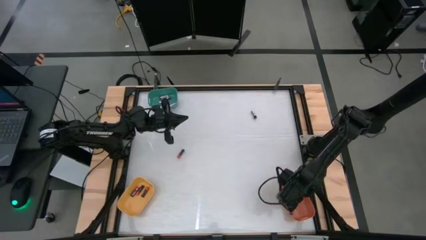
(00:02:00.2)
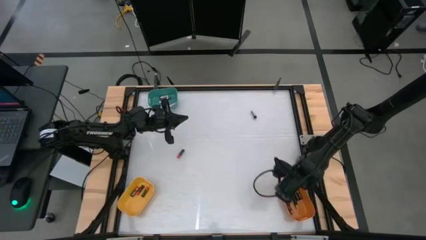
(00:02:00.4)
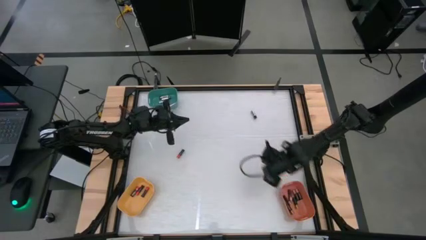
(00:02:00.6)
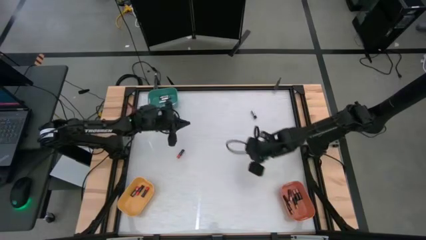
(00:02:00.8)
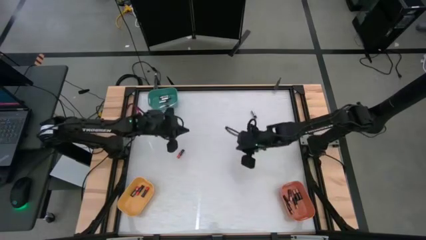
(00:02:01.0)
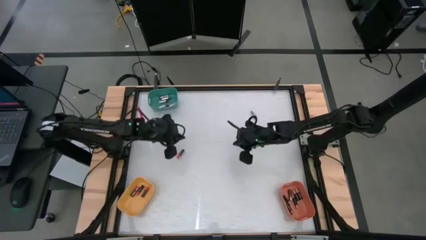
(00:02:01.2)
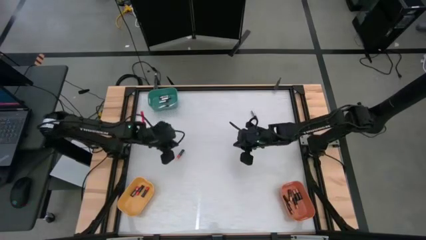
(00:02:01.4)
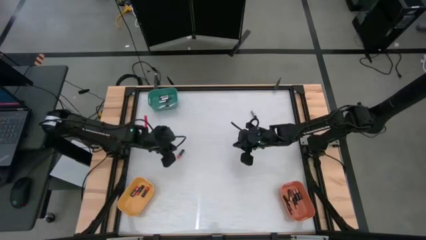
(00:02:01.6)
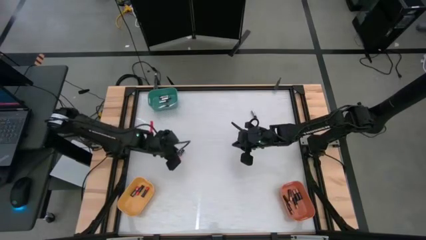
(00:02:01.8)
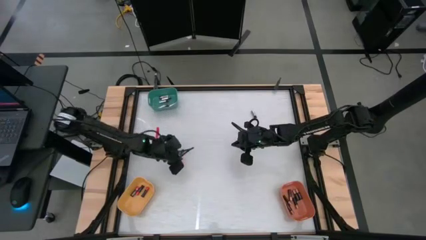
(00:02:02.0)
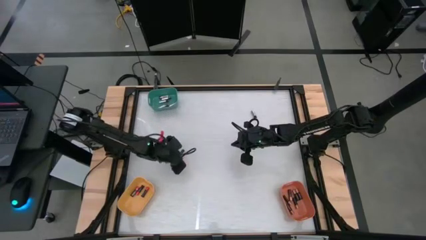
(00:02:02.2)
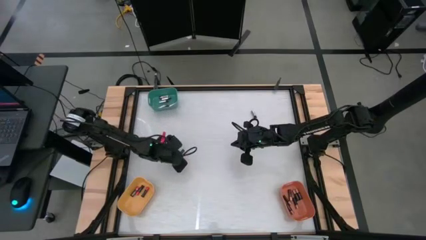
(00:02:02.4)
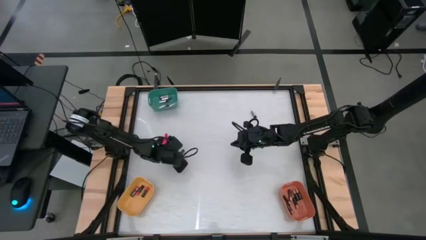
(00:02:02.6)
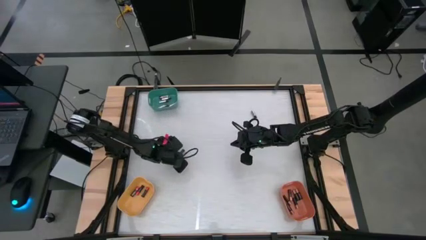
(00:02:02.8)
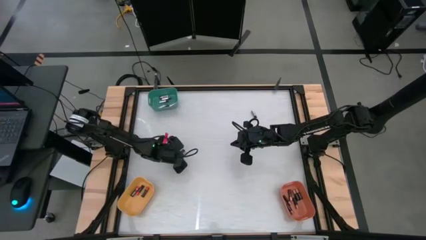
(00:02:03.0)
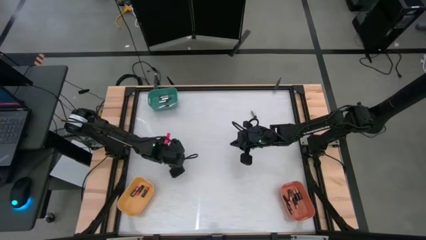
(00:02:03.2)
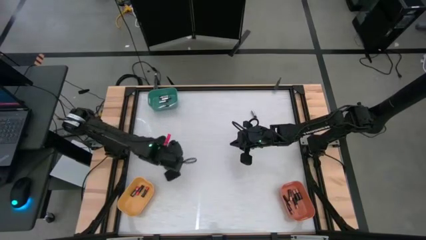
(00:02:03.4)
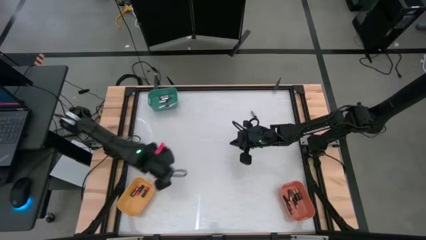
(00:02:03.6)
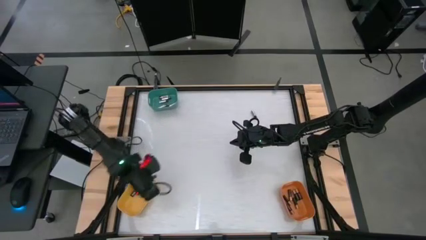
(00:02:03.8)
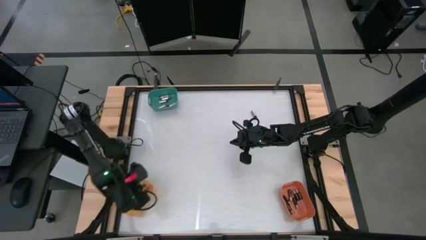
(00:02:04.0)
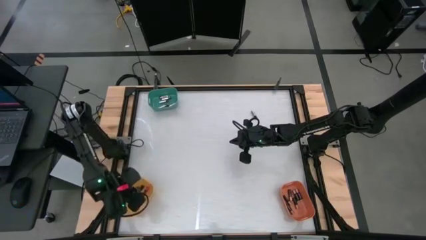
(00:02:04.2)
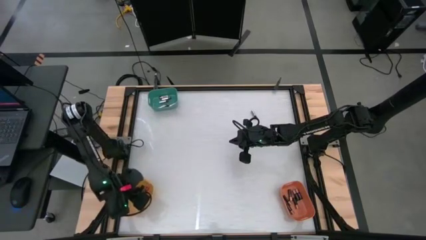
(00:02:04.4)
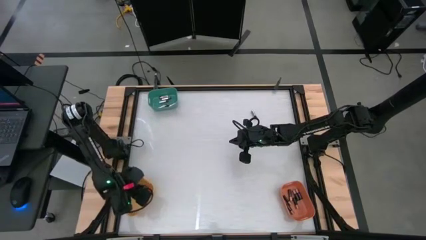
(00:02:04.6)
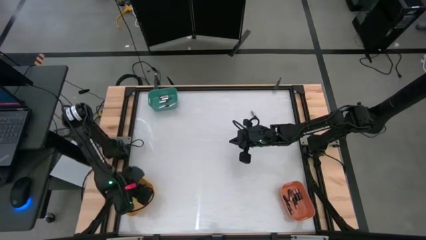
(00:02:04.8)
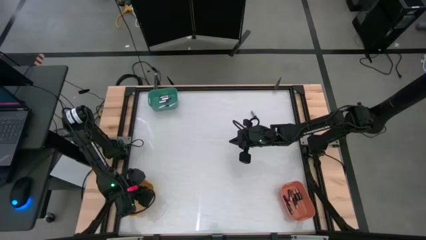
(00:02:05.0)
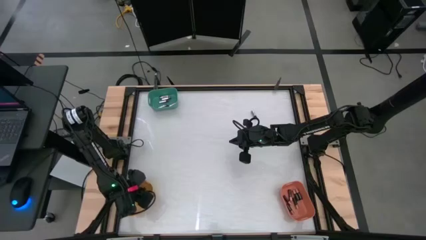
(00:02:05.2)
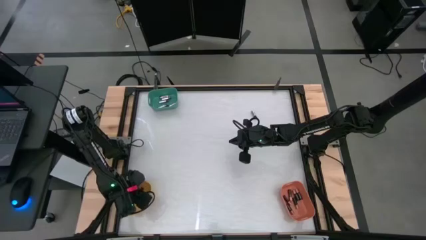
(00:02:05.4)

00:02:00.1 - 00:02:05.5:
Task: Sort batteries
Put the silver battery into the blue bin

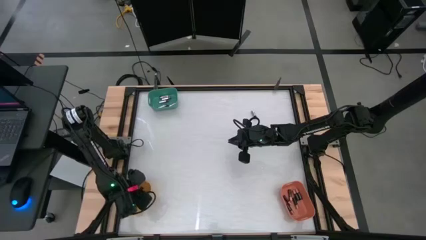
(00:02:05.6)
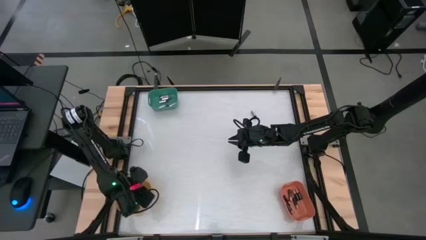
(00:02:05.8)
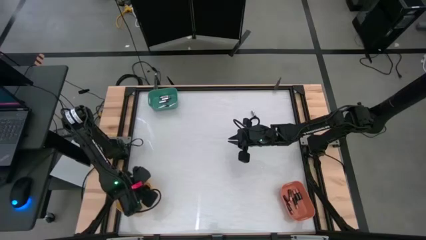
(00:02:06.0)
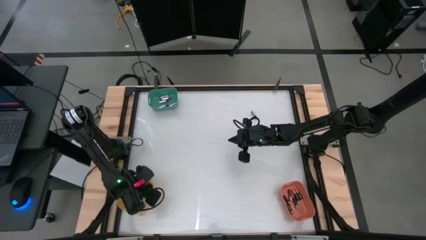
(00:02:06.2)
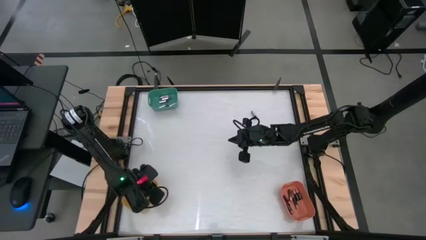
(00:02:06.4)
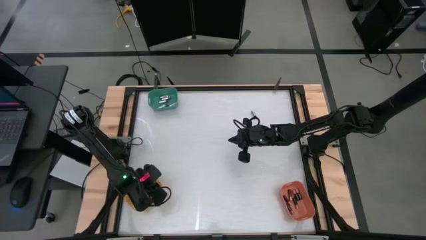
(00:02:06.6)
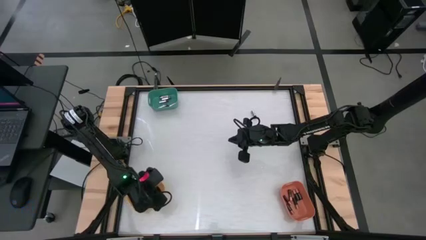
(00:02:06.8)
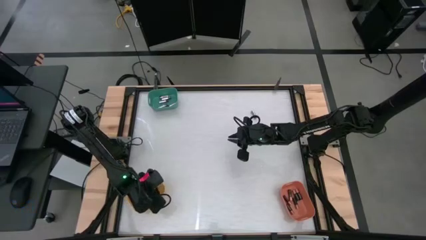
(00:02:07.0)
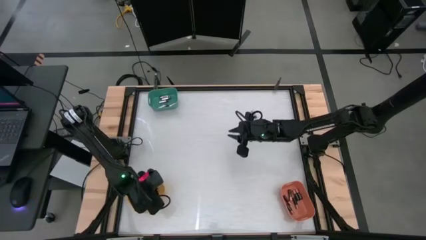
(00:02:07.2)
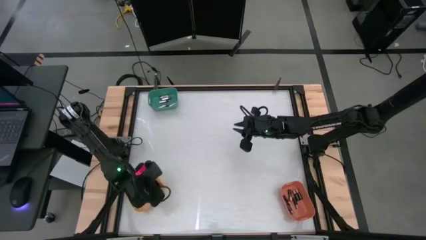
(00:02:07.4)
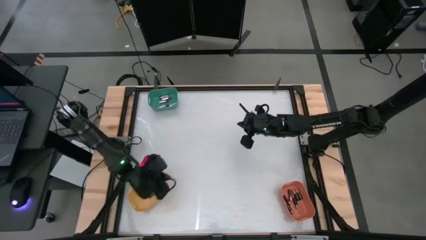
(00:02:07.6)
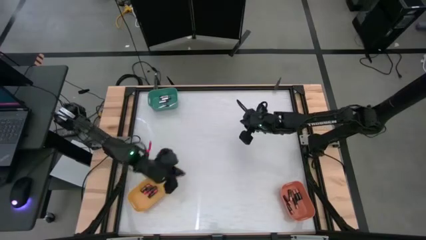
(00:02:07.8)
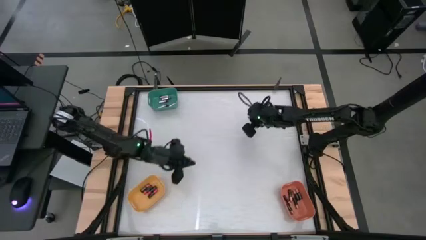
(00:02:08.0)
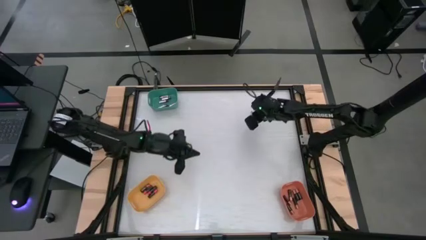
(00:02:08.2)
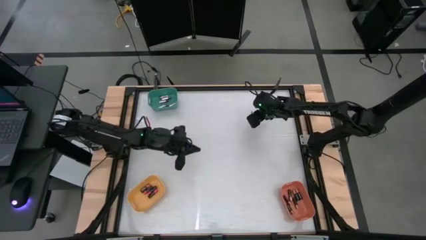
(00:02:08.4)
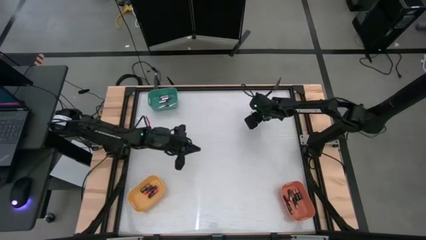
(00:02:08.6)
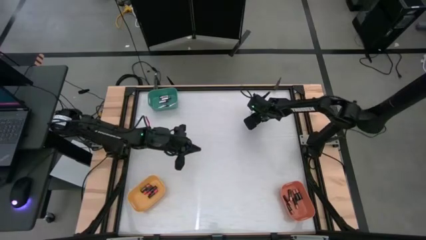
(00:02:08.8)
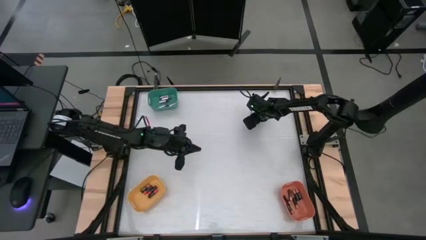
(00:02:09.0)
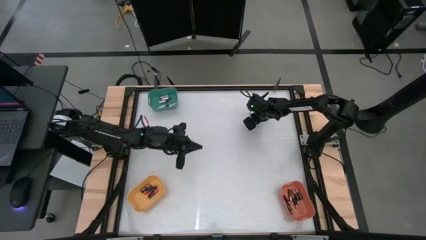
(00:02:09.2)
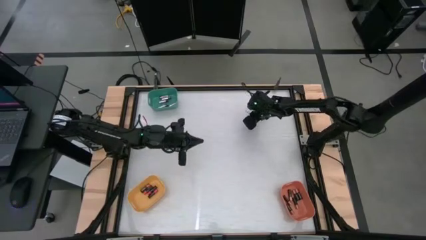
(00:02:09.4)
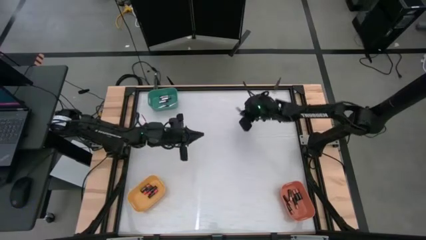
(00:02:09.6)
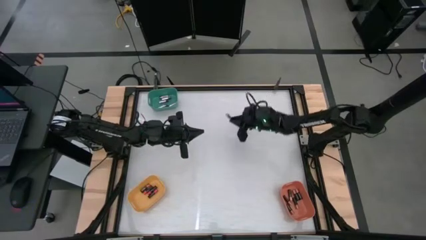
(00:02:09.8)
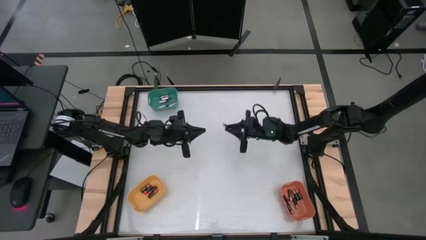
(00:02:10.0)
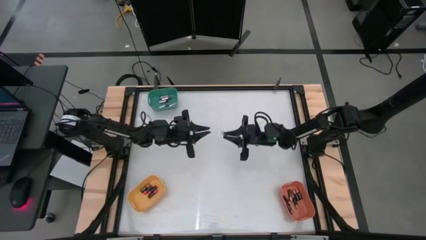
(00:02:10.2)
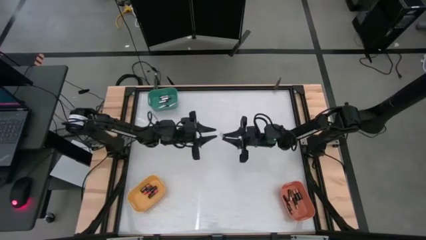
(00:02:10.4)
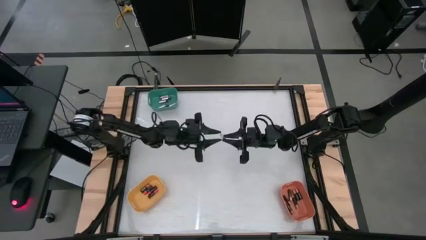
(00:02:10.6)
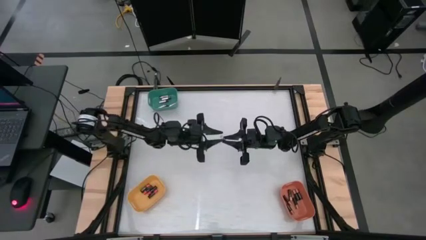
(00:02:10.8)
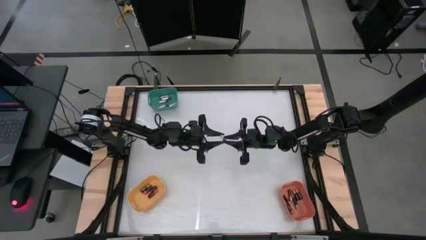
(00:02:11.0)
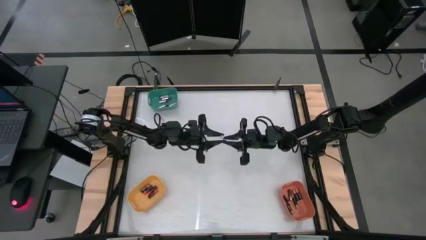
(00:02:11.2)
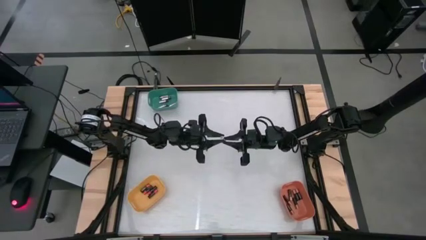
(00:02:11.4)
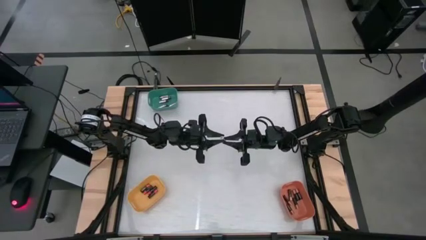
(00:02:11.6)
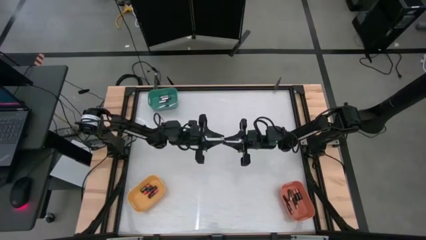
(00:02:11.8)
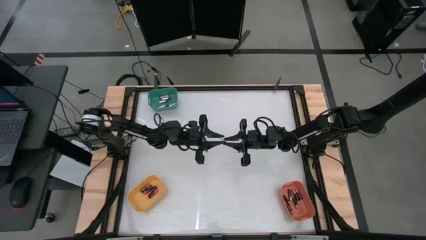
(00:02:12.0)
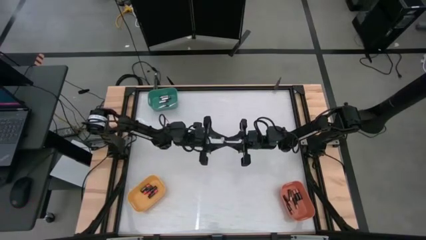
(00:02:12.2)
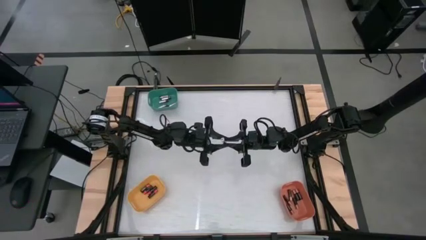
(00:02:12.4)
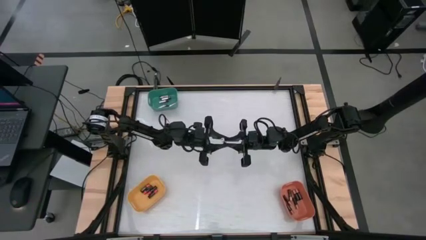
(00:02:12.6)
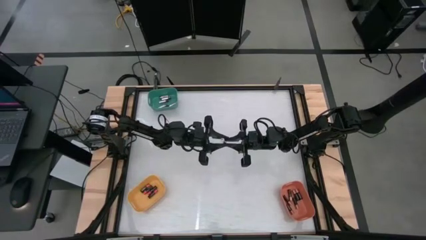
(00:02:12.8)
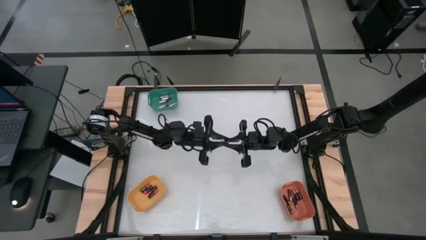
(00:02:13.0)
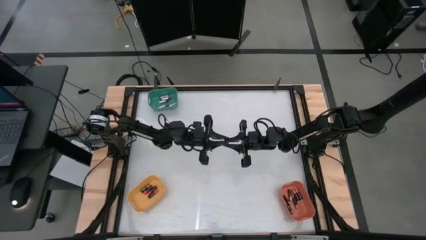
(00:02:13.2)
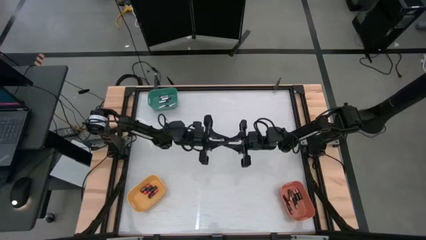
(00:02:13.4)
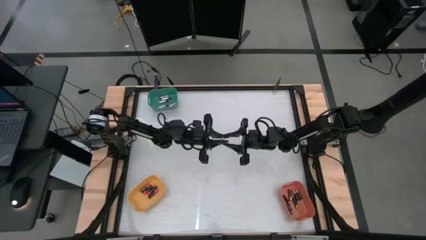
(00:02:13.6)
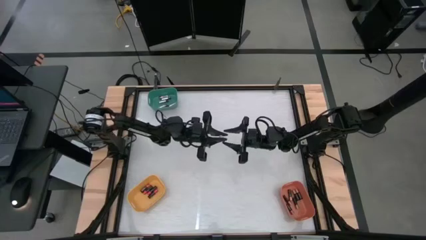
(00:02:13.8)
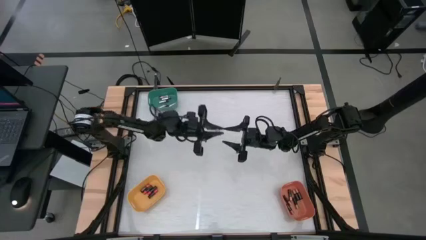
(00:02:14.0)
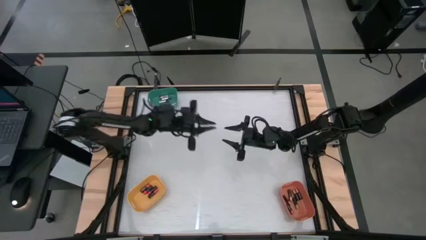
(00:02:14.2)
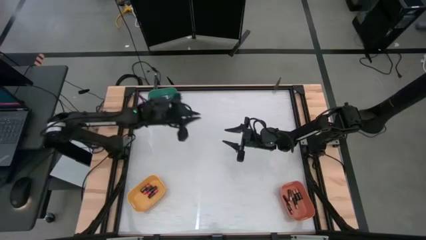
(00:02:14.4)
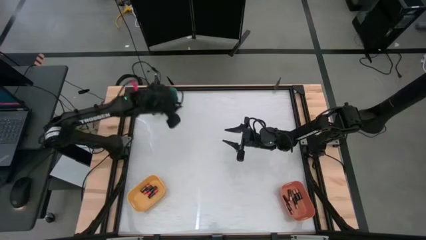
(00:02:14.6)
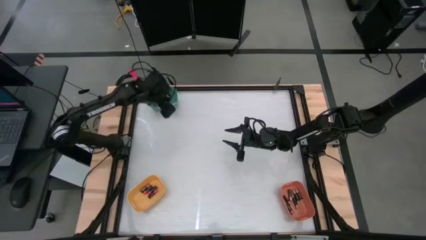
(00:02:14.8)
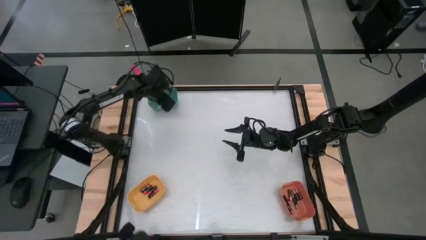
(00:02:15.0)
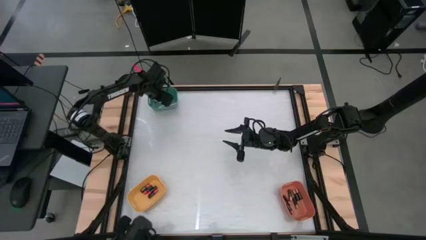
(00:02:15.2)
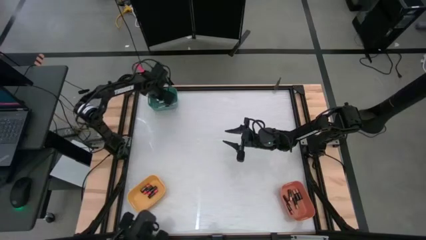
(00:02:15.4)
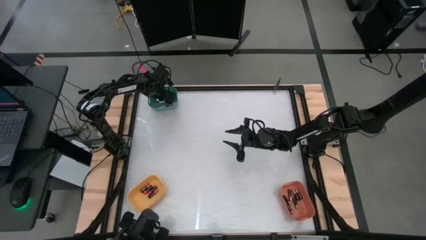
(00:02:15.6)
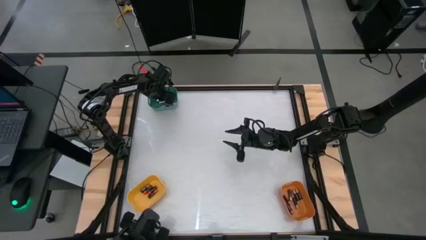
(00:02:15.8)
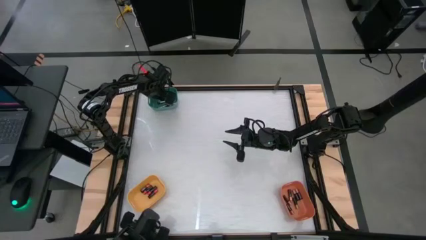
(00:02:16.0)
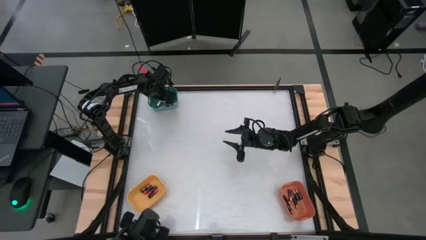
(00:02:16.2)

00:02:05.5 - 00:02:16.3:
Put the center red battery into the yellow bin
